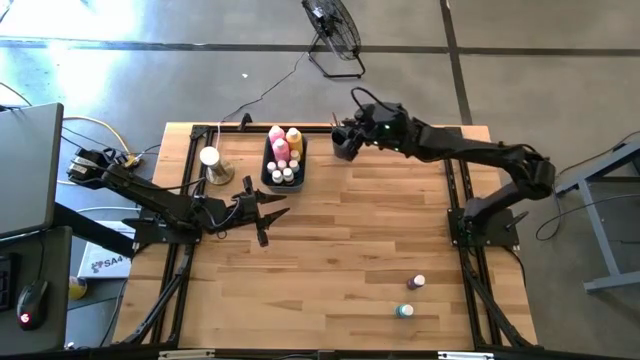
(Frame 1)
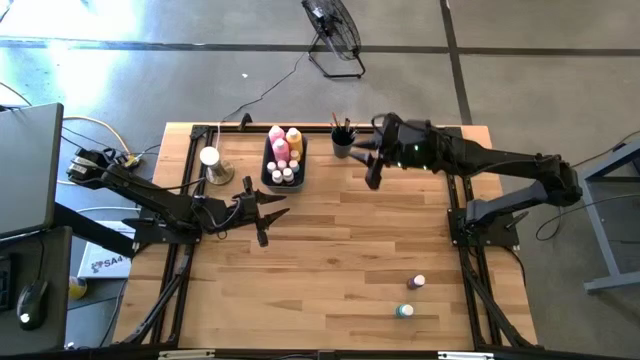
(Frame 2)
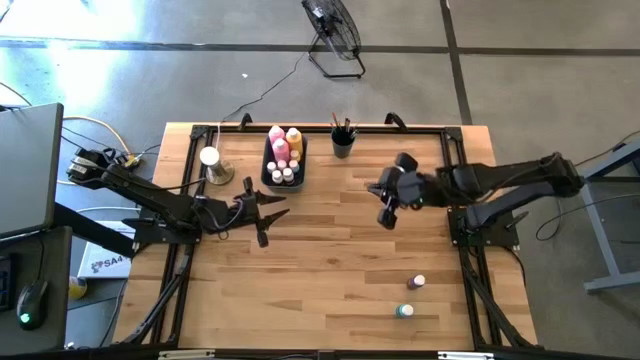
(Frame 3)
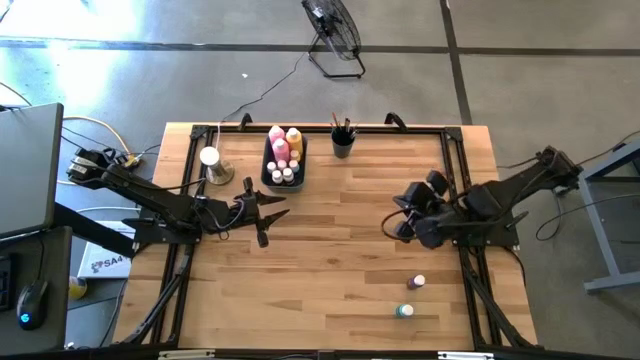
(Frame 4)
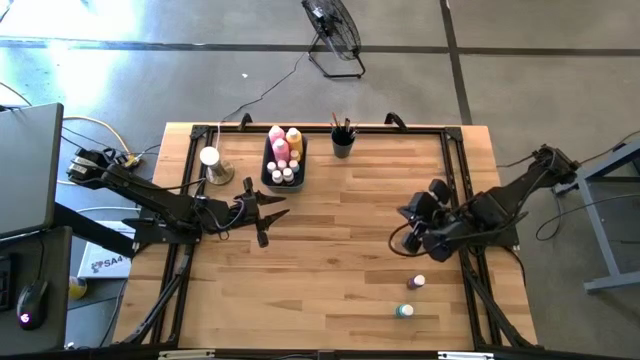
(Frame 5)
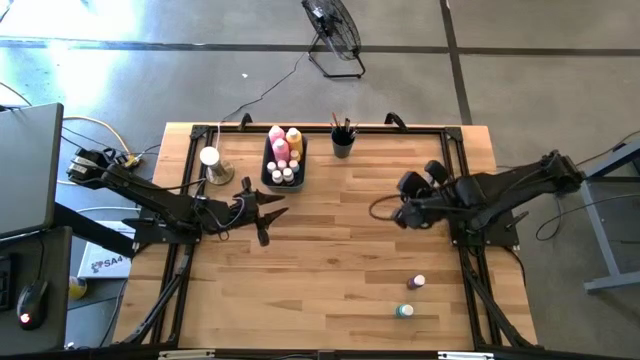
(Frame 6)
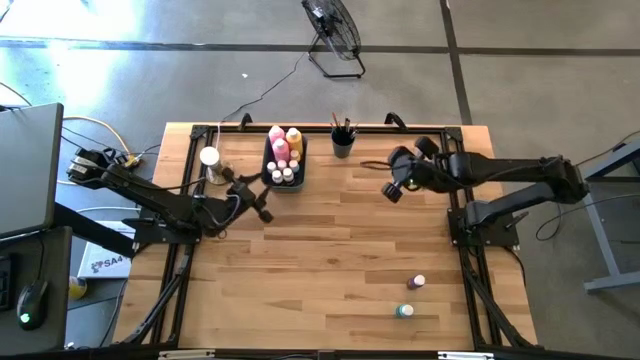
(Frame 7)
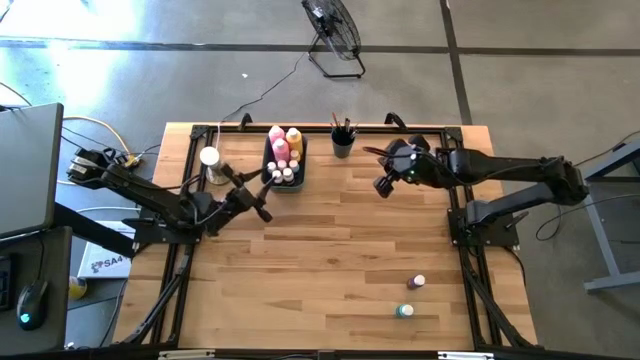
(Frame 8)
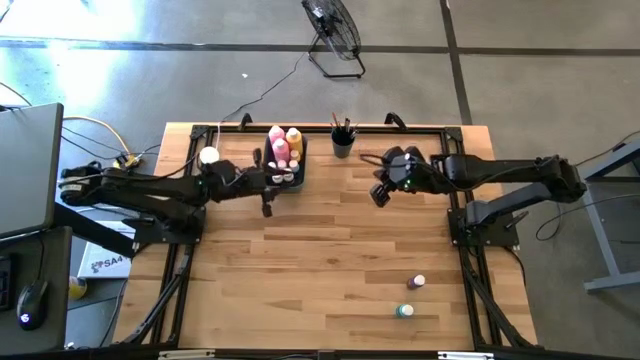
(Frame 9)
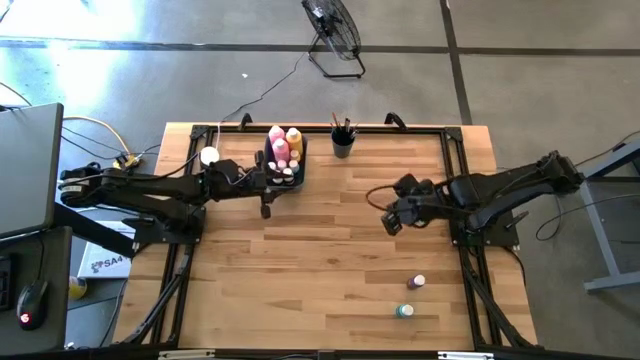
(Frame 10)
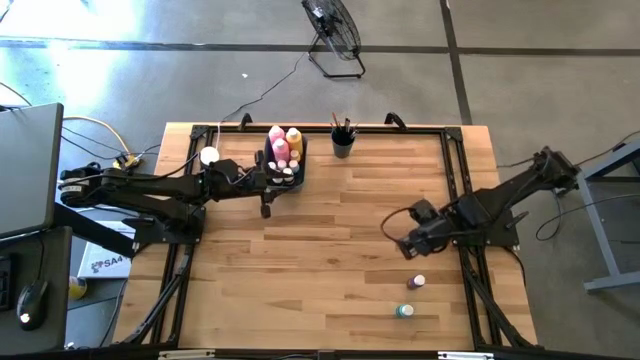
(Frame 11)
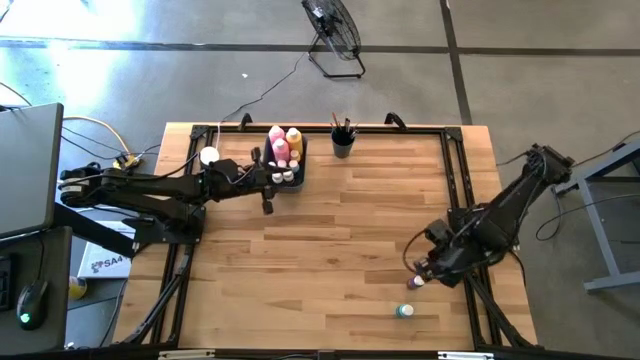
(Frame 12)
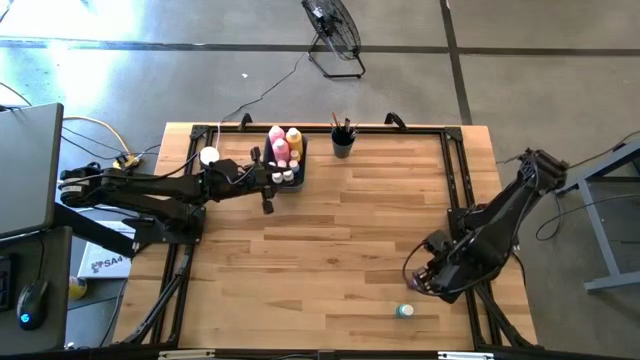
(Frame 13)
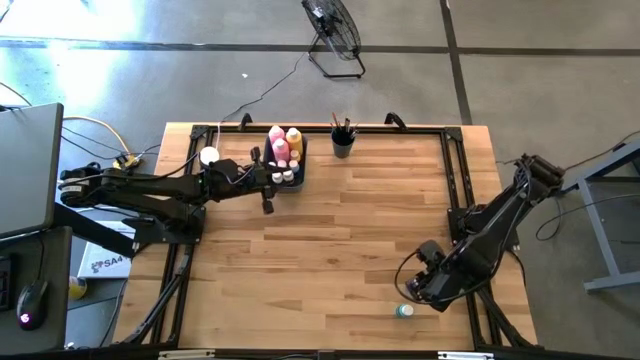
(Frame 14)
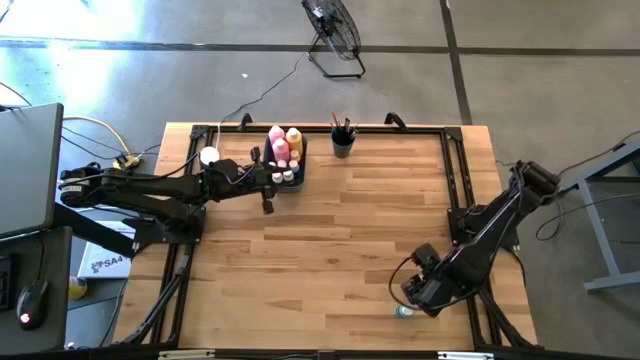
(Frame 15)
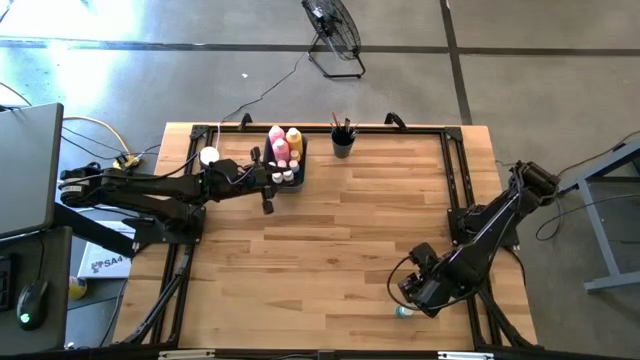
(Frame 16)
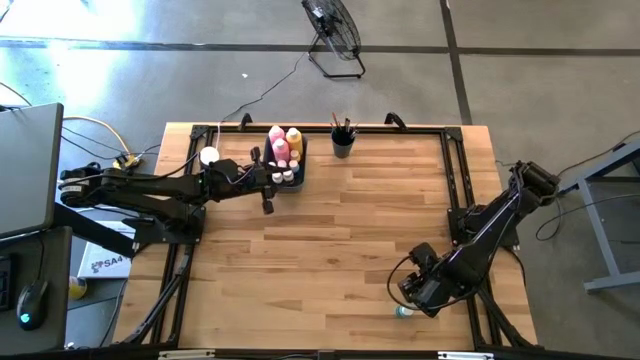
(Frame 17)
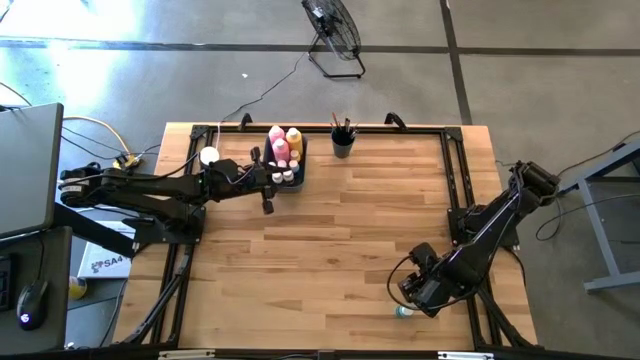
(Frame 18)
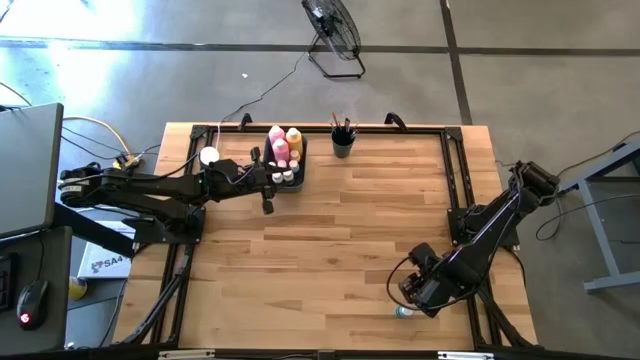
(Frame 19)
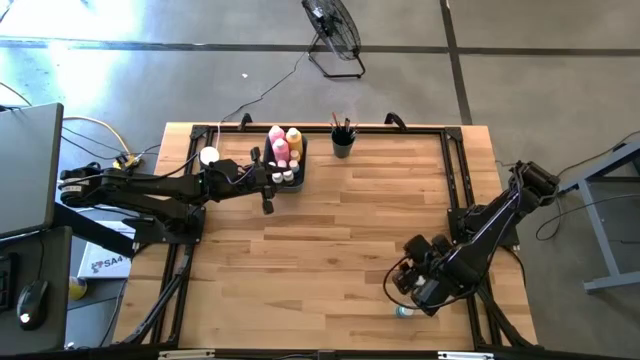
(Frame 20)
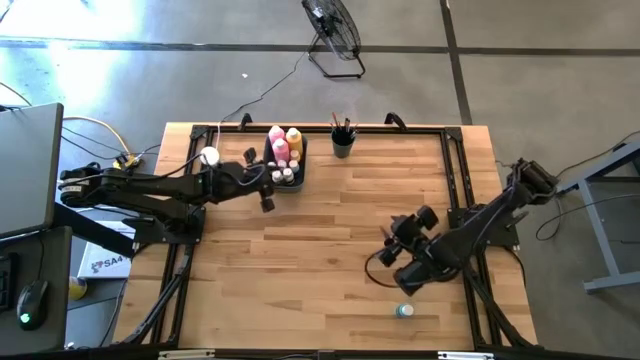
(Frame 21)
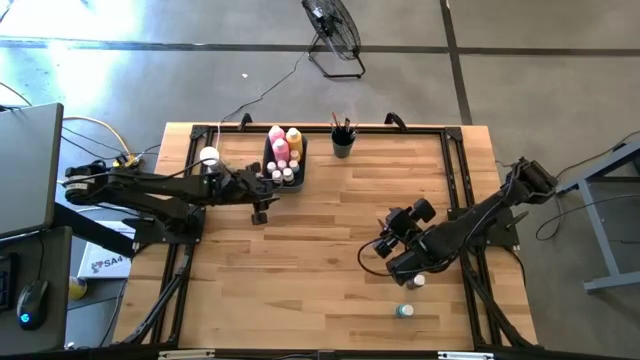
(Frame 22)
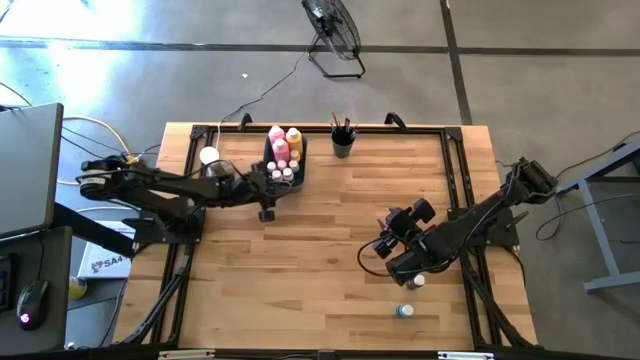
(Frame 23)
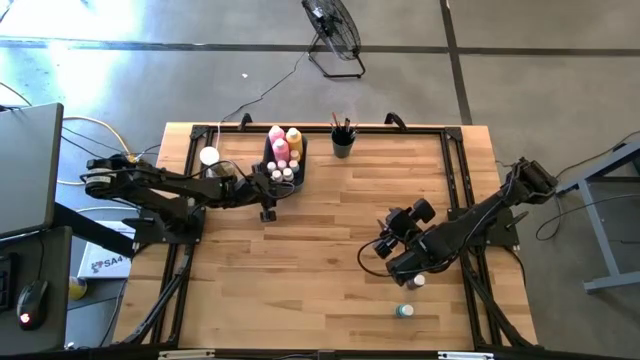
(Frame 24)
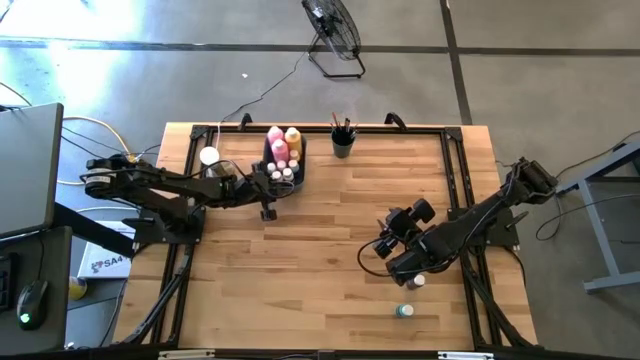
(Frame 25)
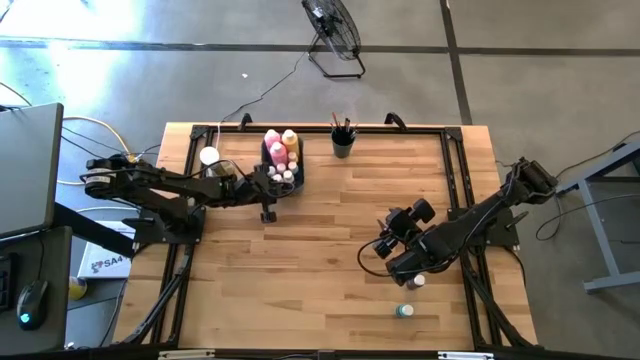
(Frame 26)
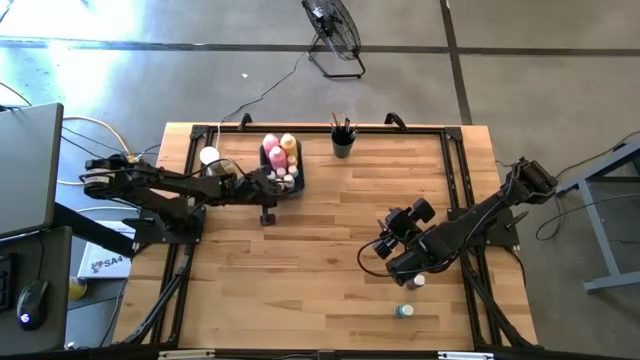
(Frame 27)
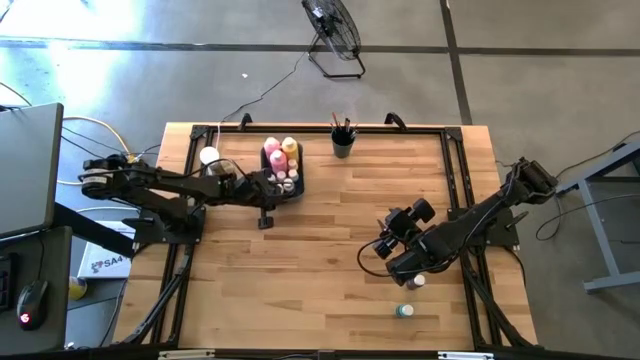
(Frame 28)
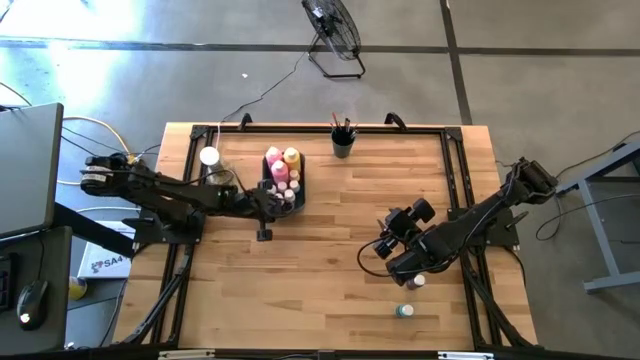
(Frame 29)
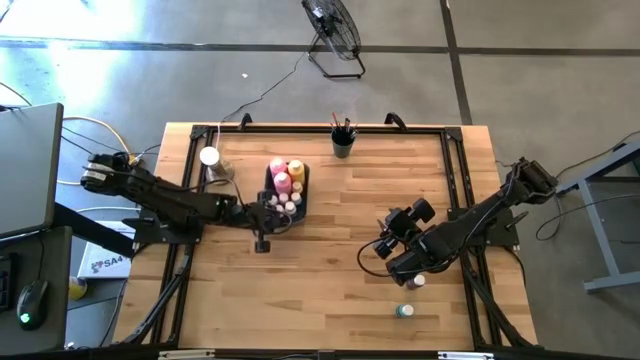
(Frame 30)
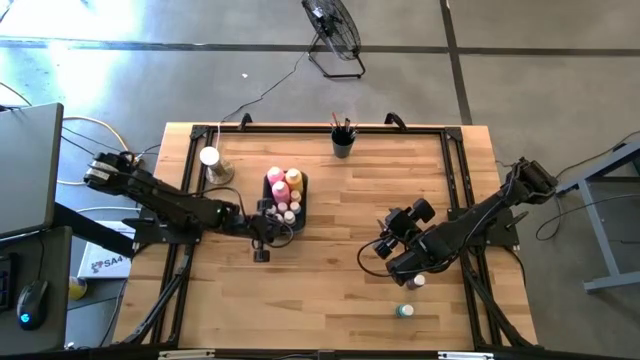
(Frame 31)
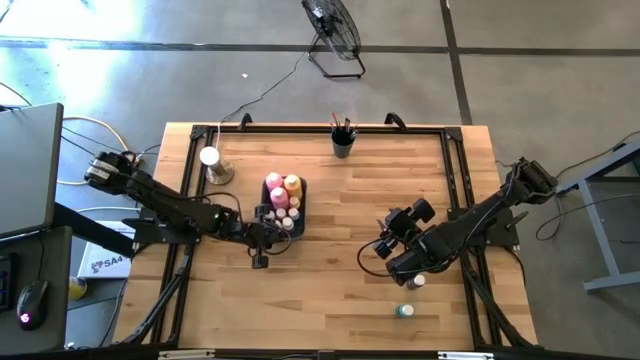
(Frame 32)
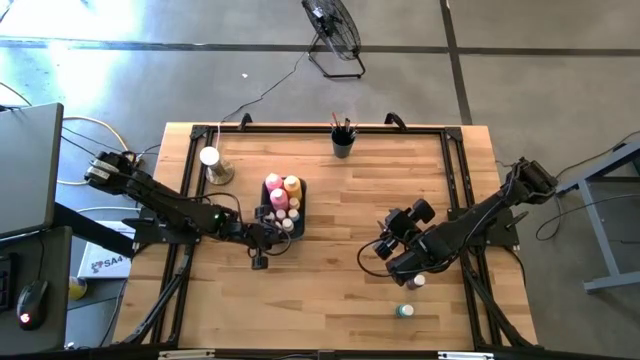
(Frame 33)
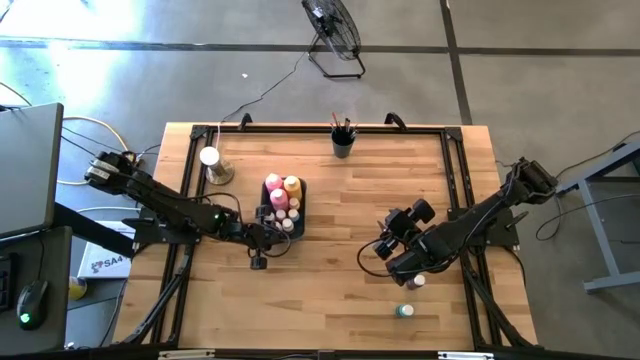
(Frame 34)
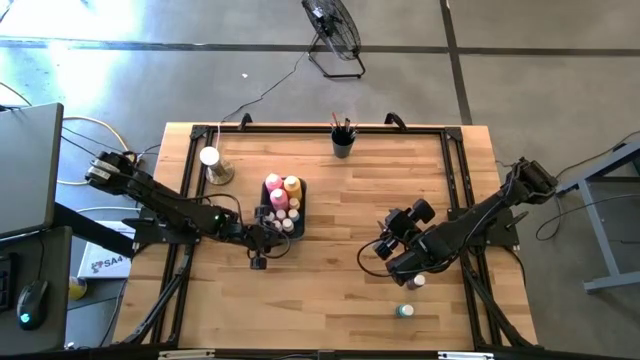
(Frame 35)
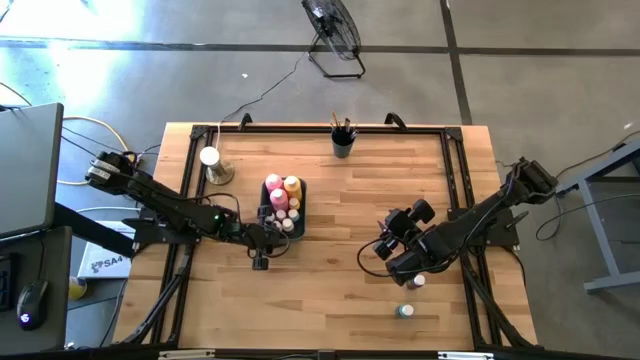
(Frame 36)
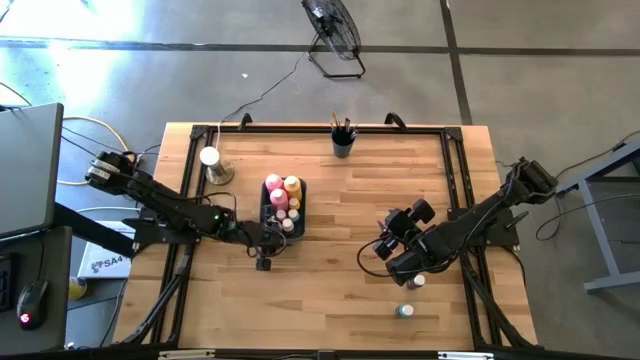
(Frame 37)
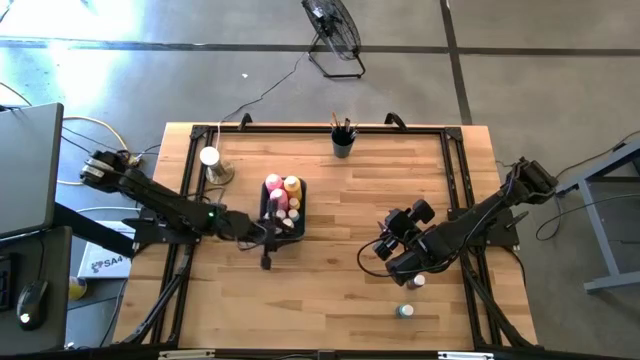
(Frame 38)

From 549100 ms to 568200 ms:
Task: Pick & Place Paint Supplies
Adjust the green bin
